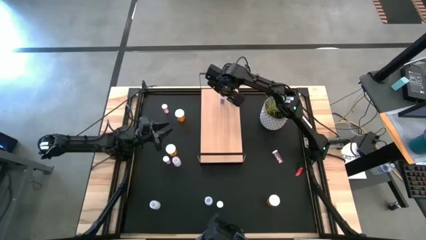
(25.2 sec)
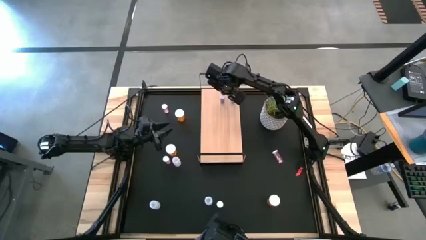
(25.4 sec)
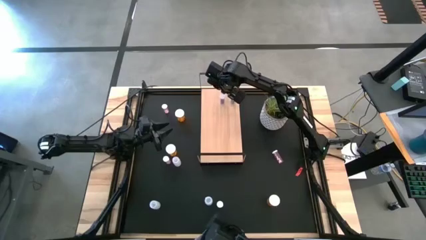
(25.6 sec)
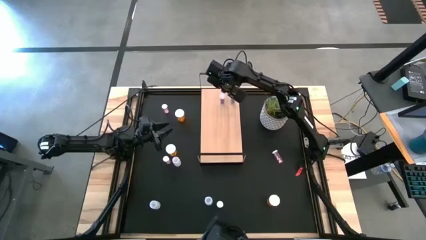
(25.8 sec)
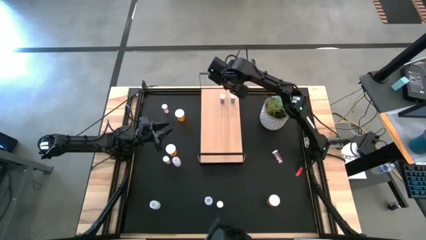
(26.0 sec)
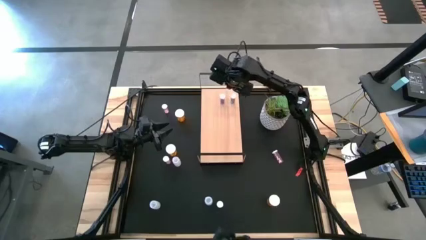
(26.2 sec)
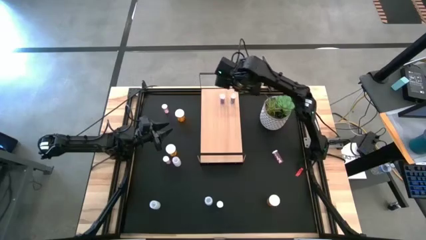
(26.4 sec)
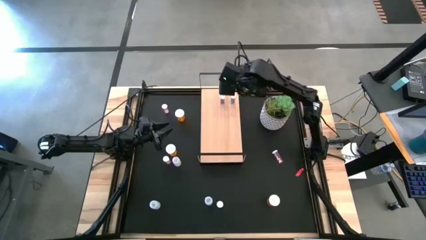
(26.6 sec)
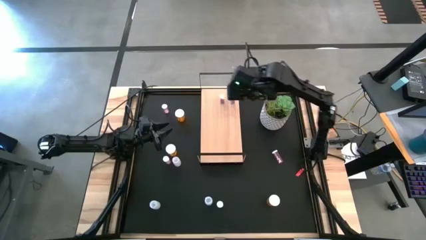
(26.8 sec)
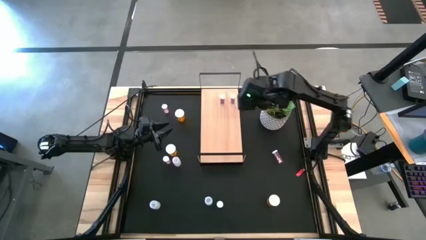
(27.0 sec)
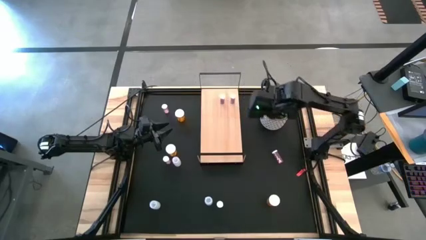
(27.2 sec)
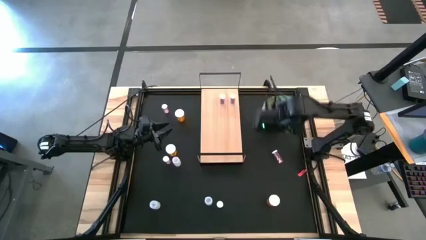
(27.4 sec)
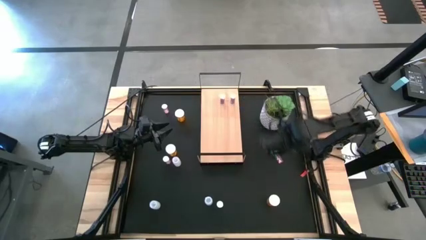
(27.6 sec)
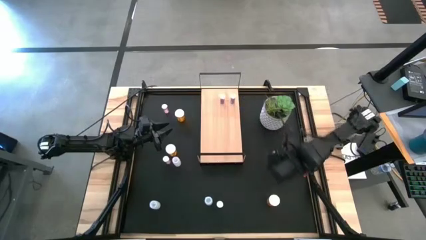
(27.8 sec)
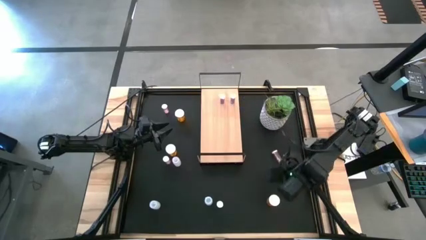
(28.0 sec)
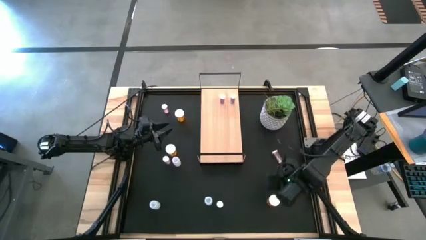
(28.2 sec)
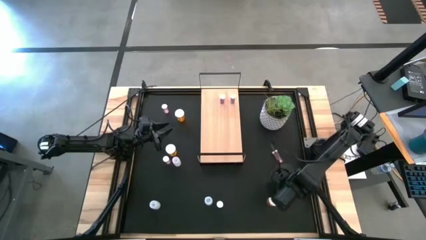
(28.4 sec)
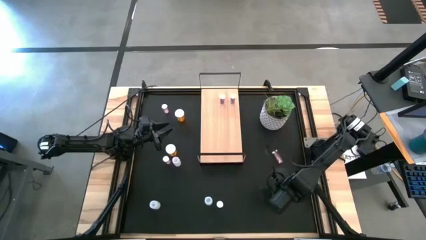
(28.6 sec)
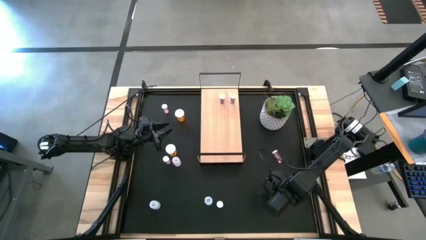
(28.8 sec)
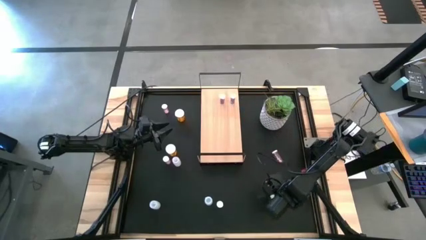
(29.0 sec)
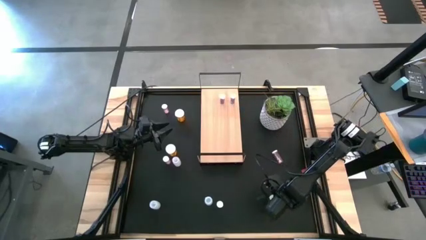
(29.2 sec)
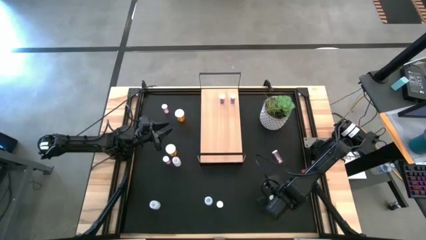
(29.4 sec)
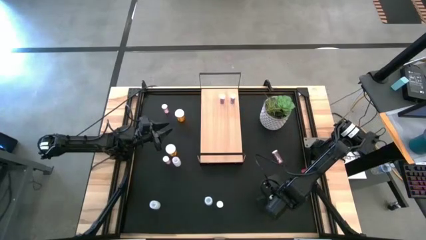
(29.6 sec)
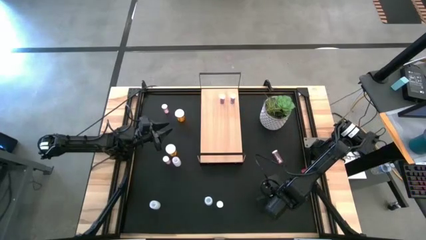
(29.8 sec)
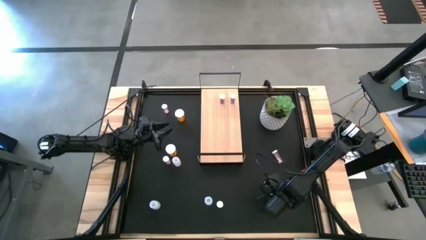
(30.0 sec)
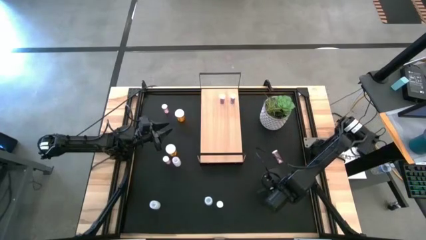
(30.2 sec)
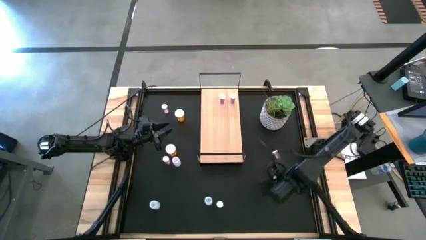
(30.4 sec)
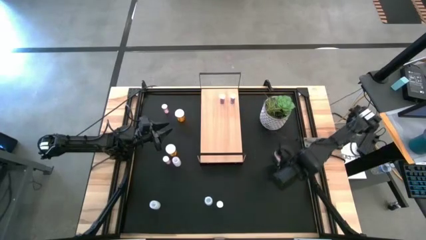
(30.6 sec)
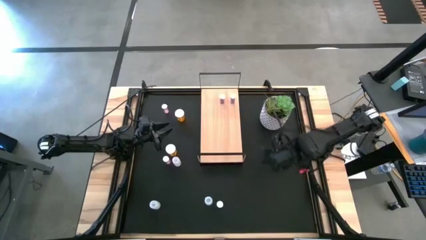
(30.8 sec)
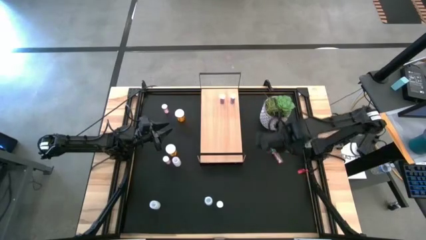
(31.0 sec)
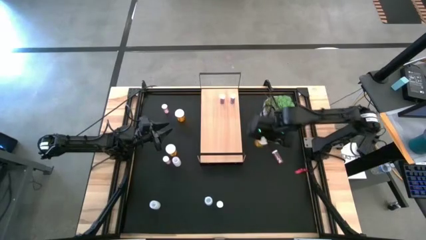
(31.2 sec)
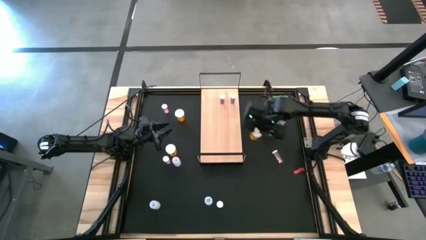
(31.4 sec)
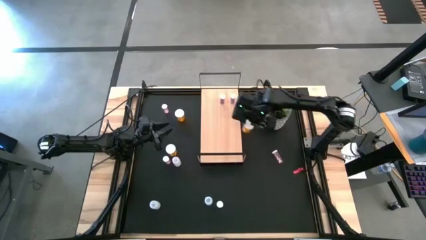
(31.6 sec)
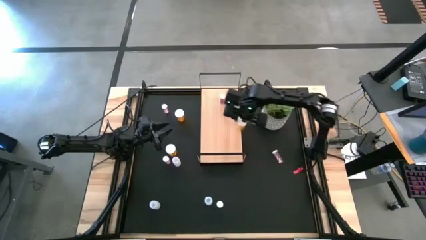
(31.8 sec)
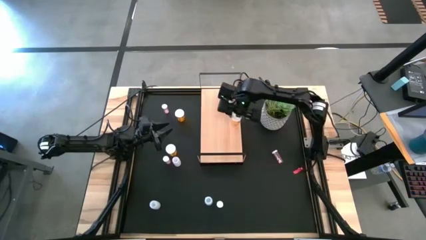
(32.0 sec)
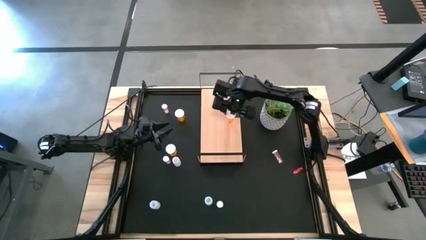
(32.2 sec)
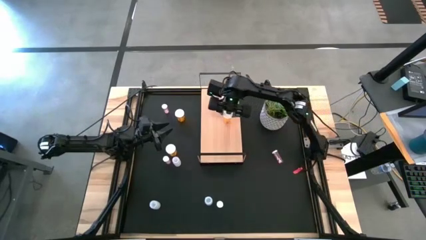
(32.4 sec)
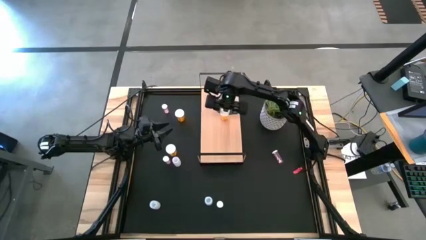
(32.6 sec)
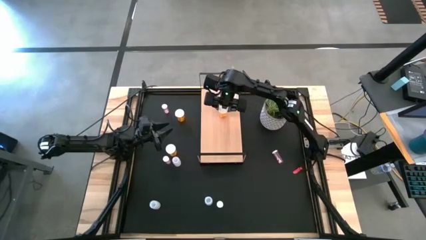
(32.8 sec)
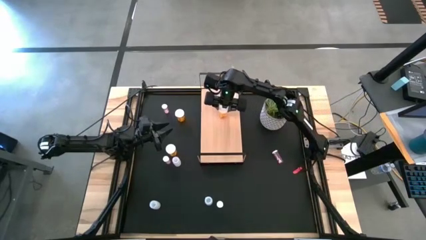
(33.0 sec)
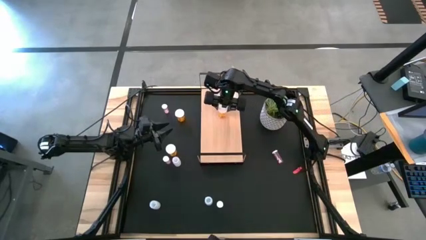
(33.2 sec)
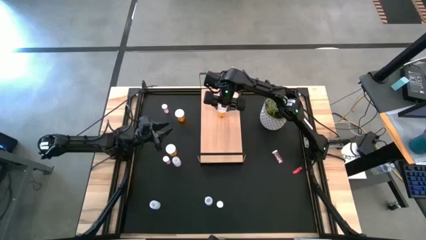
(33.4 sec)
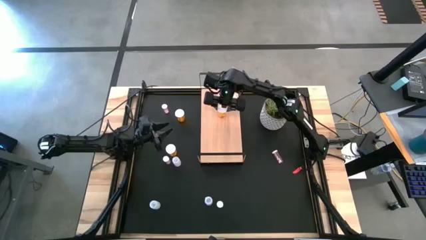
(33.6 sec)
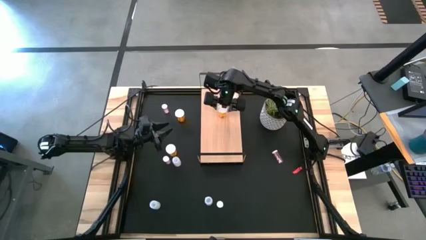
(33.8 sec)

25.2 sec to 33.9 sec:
Task: Pick and place medicine bottles onto shelf by color
Put the bottom orange pill bottle on the shelf

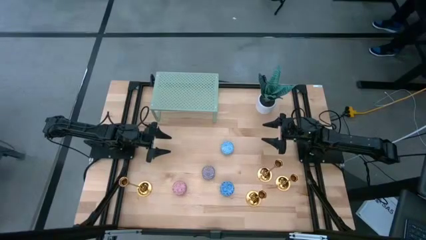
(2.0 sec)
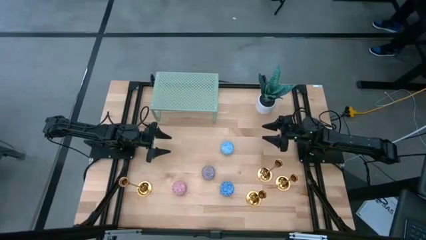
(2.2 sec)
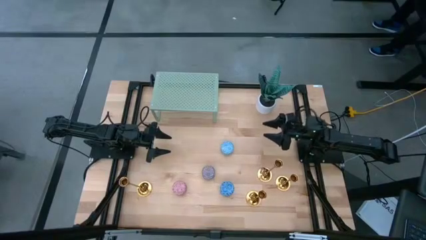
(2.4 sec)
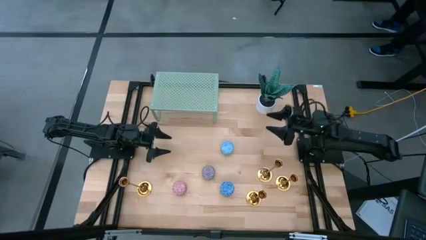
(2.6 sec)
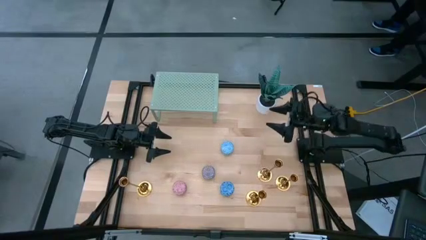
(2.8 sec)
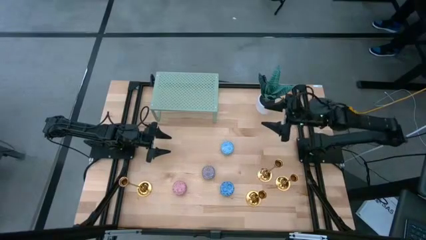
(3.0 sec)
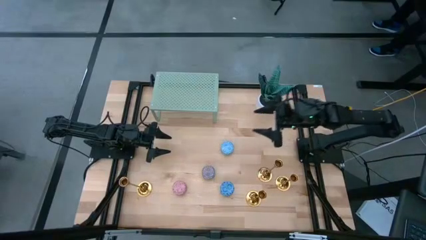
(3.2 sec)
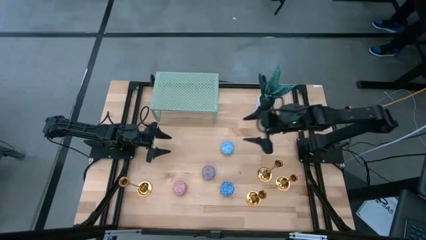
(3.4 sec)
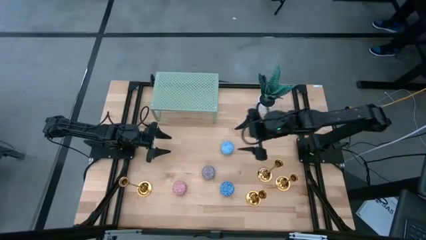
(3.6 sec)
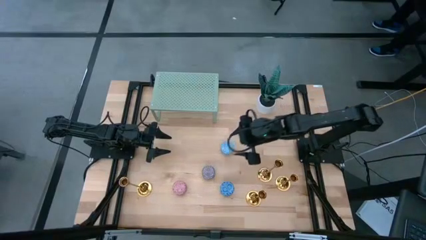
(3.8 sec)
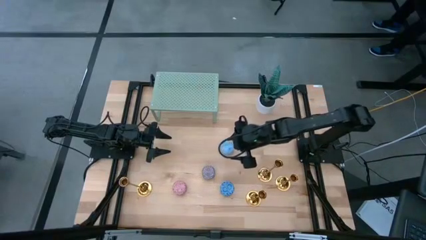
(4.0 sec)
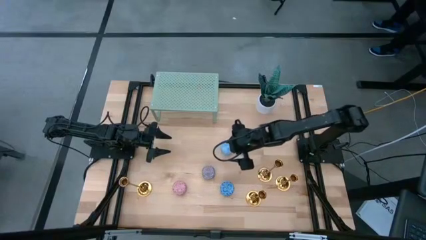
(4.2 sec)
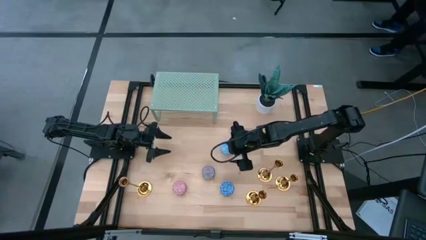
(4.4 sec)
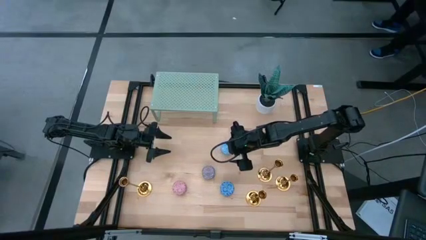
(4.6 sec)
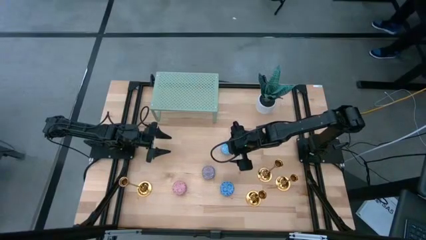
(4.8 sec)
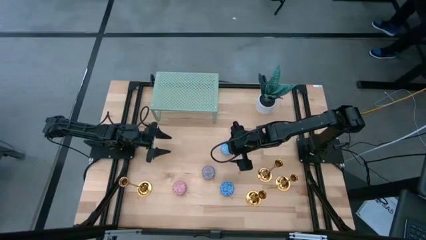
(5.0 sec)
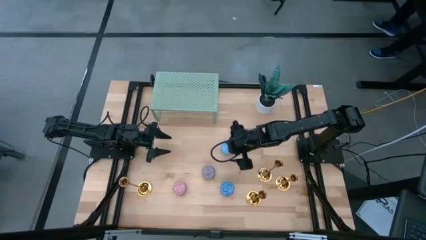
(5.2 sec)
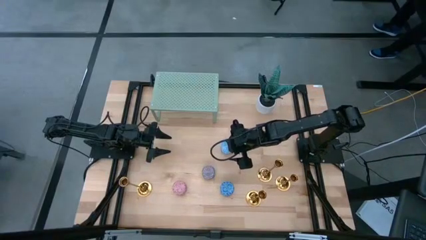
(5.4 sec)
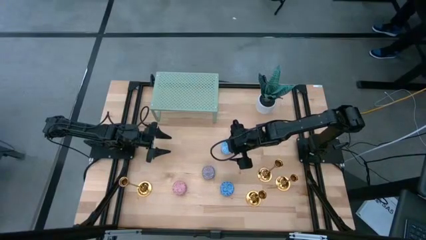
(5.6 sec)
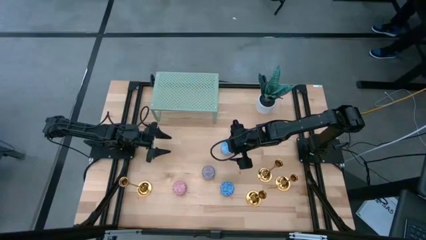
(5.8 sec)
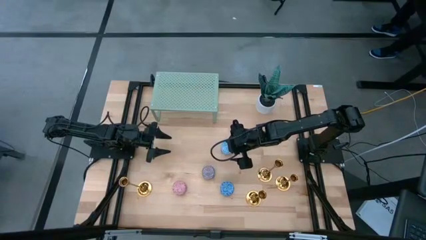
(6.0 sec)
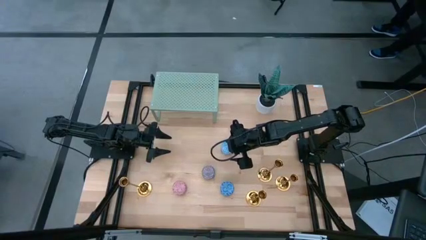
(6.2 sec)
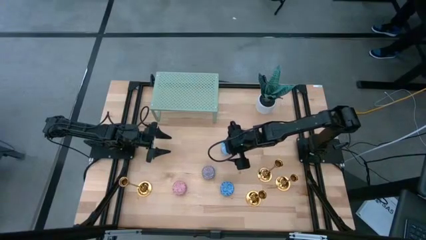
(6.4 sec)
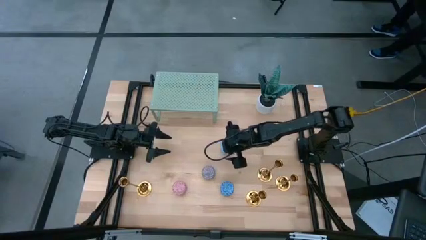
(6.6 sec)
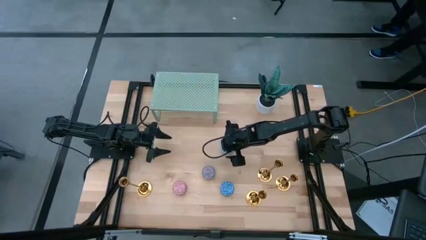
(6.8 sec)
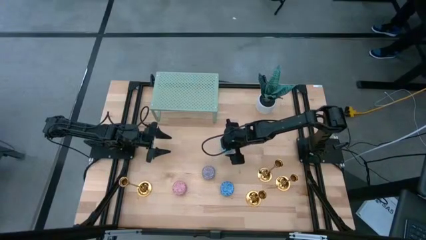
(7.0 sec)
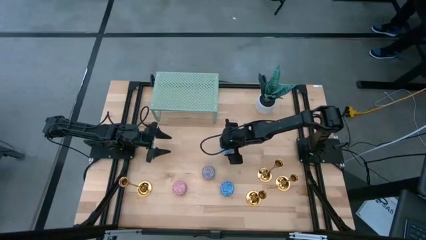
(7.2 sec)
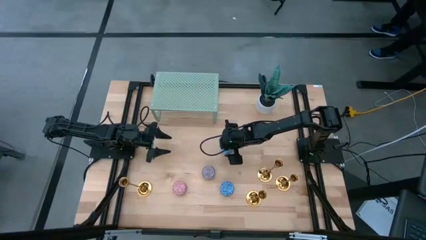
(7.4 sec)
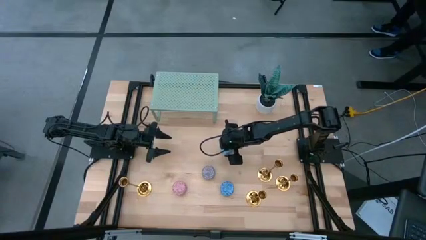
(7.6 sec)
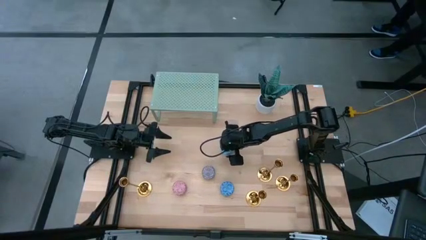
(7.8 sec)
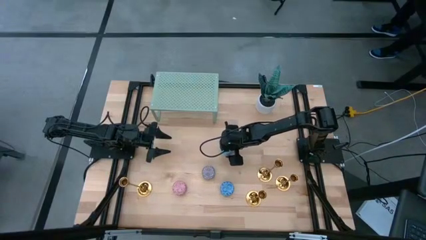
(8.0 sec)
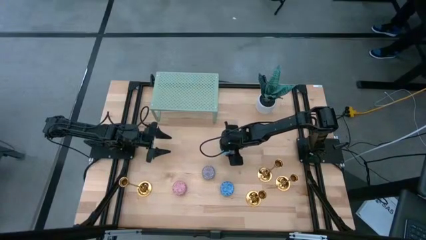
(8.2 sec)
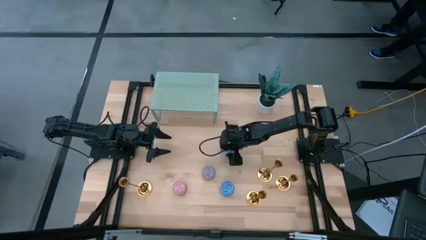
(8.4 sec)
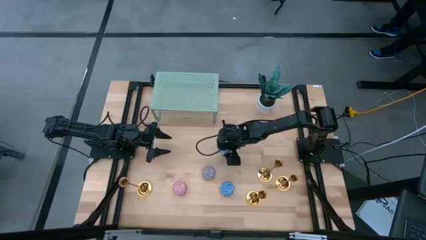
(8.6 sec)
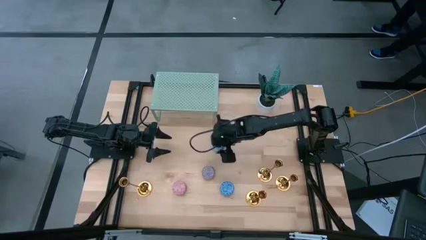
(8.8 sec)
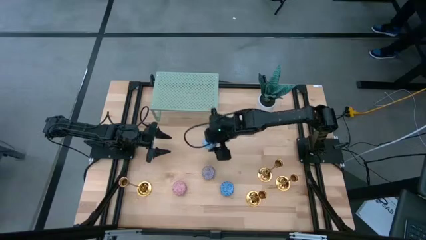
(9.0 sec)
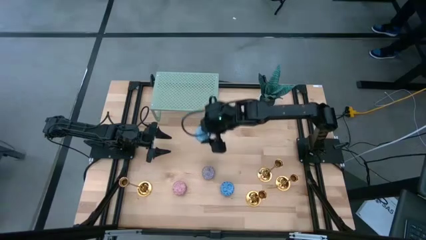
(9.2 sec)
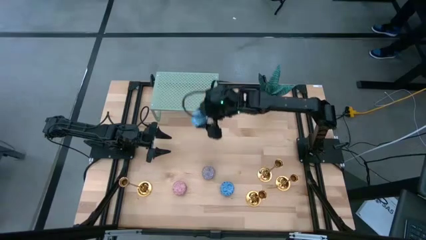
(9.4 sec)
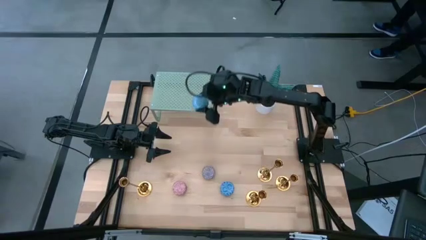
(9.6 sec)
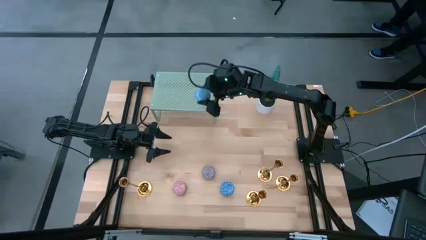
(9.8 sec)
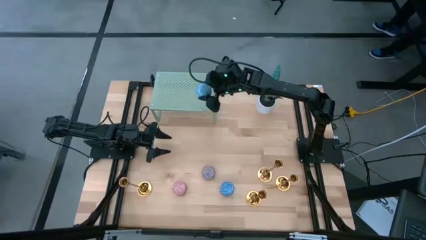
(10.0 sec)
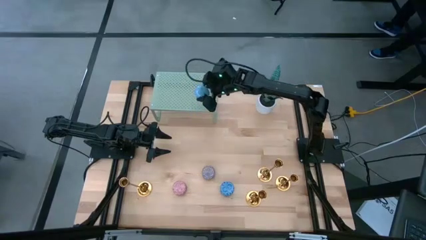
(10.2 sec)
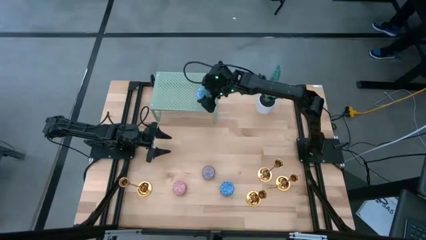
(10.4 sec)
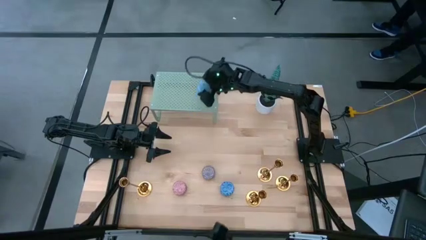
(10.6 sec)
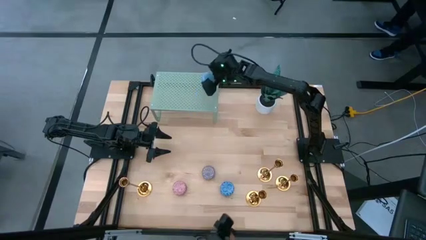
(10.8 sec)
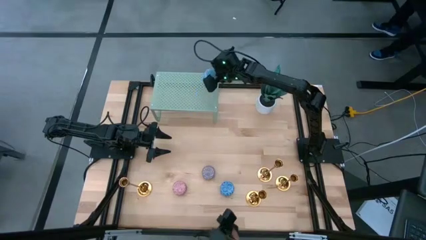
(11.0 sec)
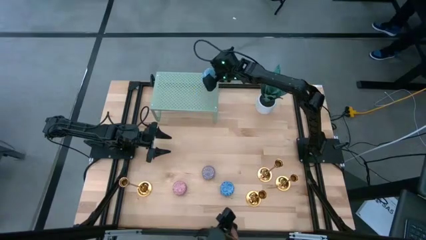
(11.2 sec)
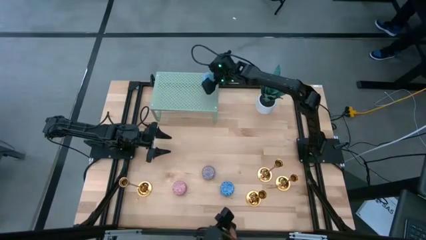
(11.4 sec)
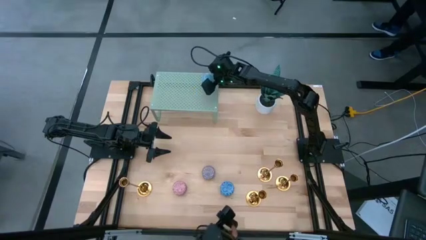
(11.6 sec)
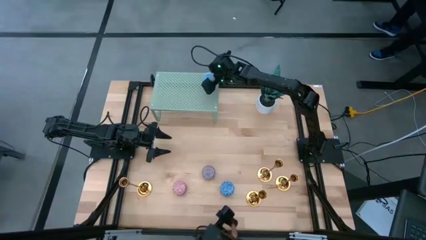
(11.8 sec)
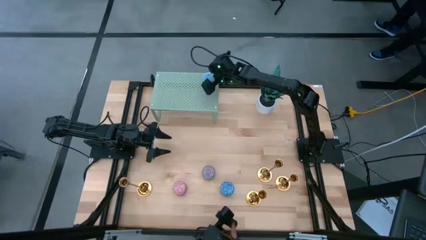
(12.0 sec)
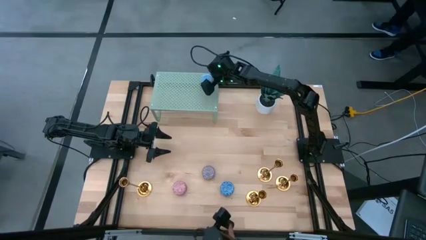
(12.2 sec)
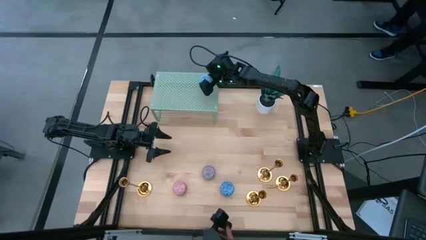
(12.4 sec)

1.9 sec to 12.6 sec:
Task: Pick & Place candle stick holders
Put the light blue scented candle on the shelf
